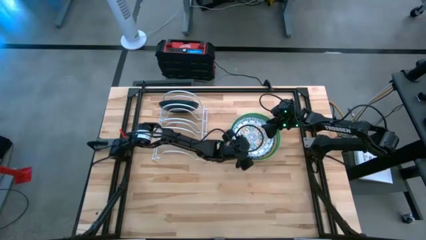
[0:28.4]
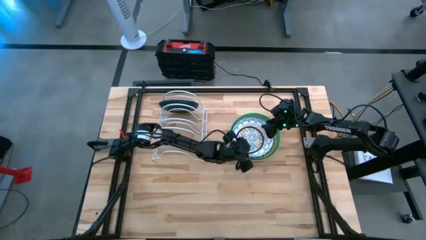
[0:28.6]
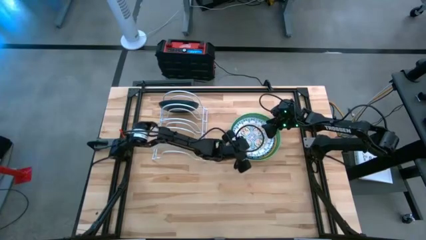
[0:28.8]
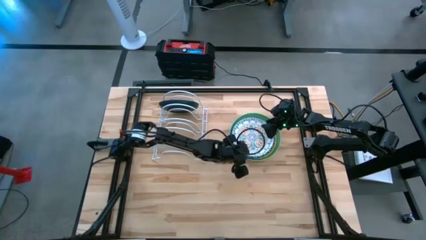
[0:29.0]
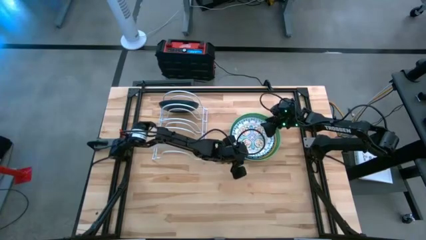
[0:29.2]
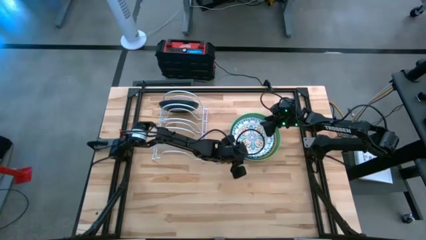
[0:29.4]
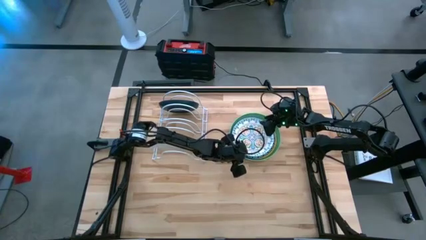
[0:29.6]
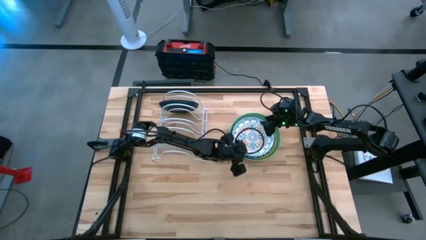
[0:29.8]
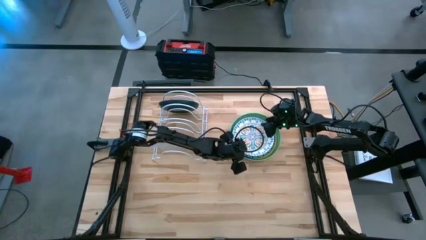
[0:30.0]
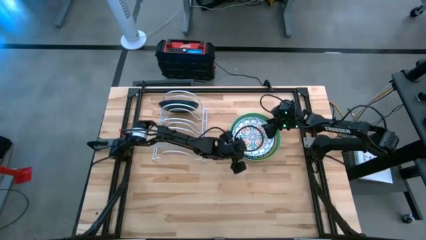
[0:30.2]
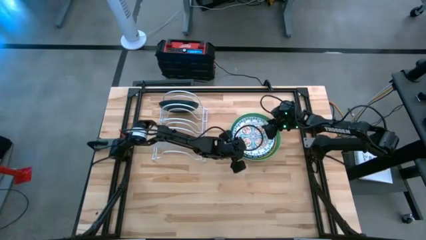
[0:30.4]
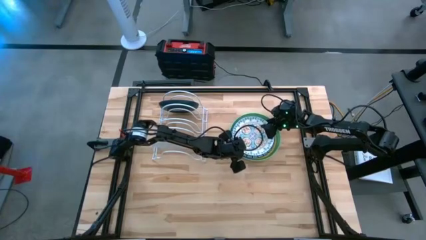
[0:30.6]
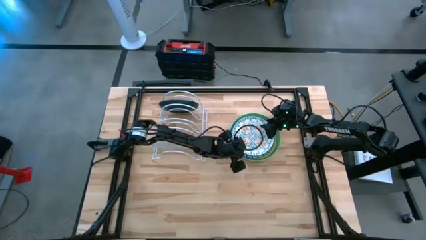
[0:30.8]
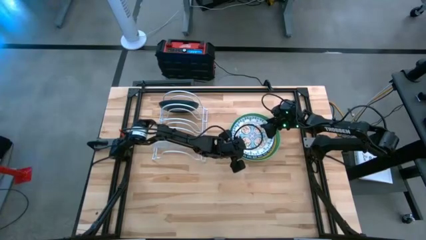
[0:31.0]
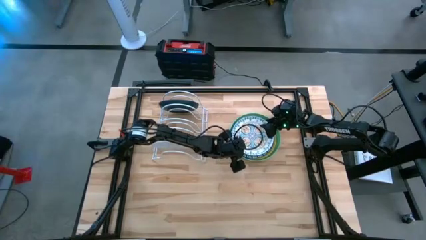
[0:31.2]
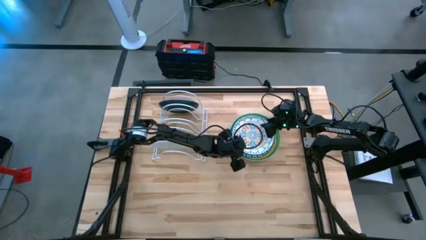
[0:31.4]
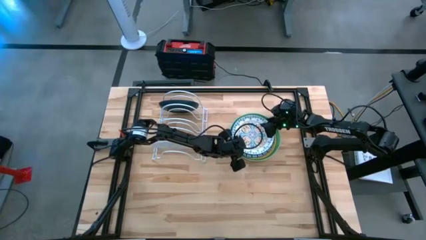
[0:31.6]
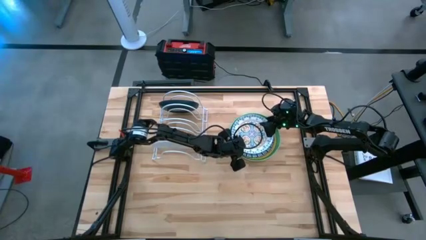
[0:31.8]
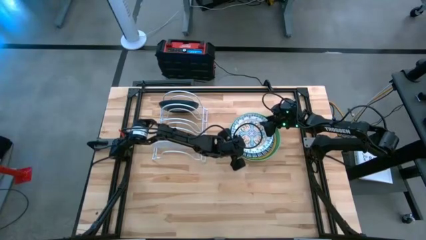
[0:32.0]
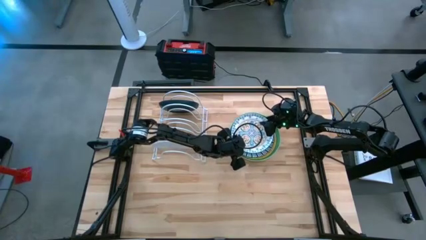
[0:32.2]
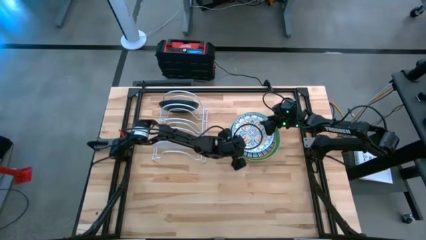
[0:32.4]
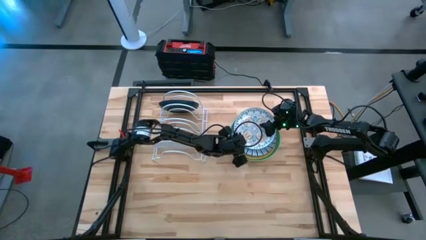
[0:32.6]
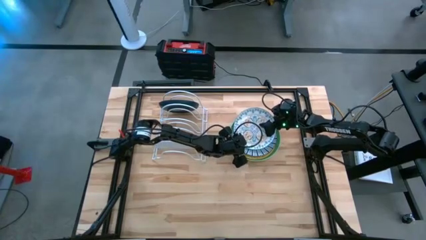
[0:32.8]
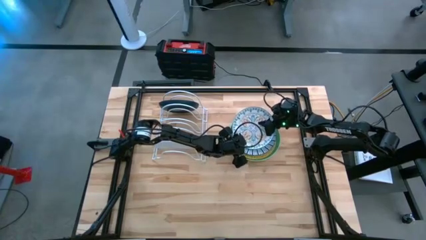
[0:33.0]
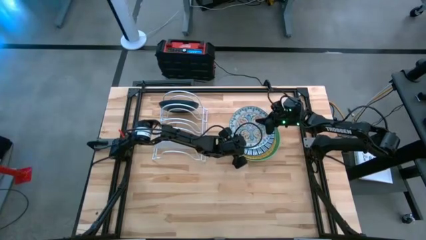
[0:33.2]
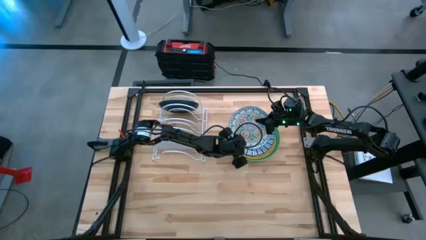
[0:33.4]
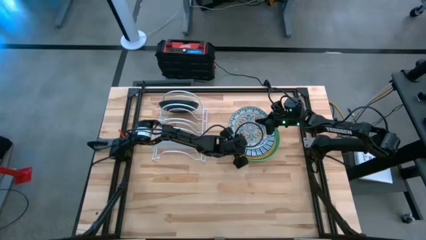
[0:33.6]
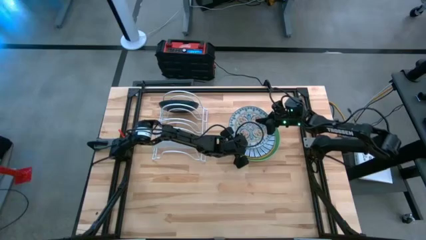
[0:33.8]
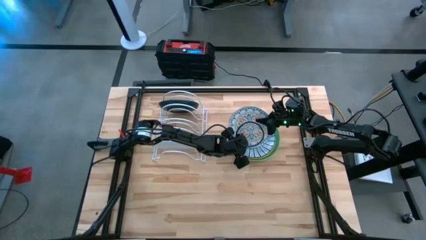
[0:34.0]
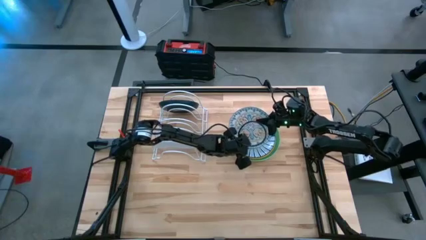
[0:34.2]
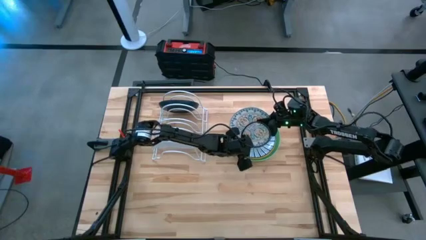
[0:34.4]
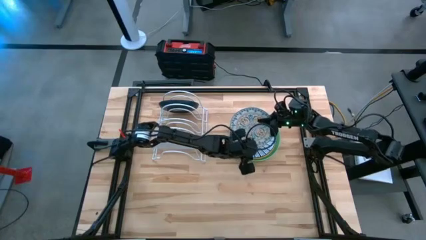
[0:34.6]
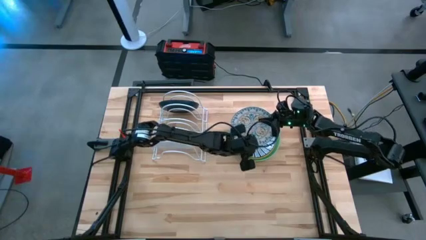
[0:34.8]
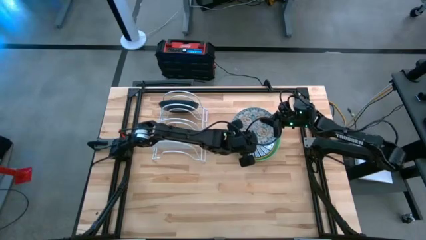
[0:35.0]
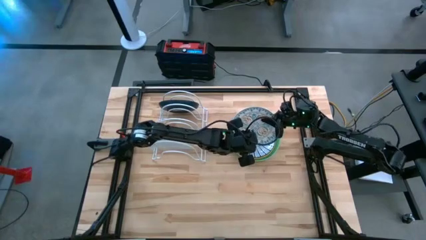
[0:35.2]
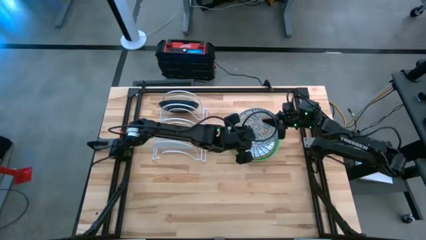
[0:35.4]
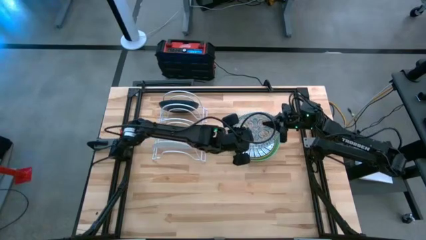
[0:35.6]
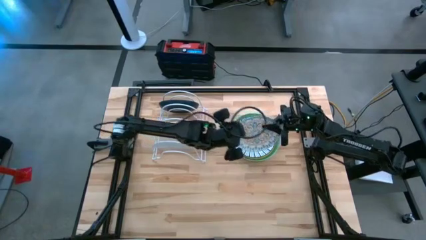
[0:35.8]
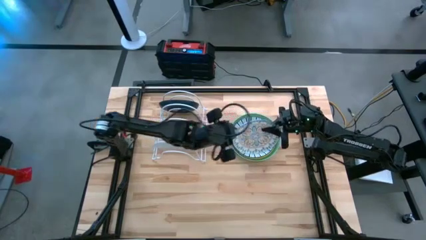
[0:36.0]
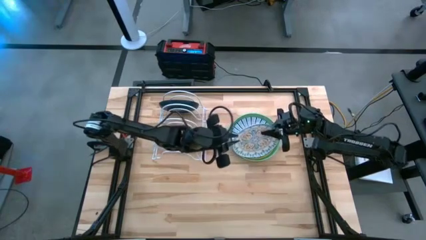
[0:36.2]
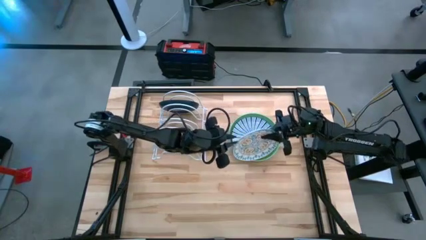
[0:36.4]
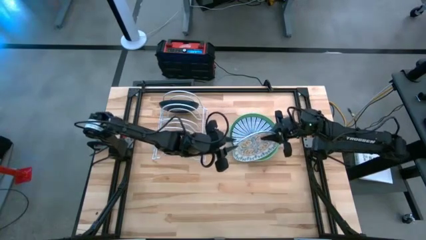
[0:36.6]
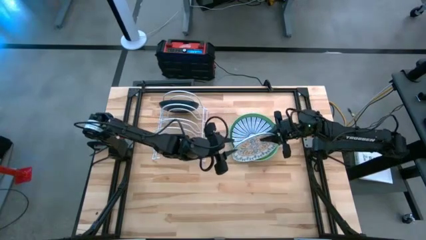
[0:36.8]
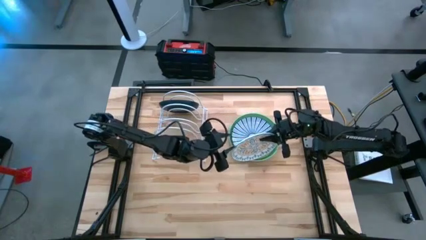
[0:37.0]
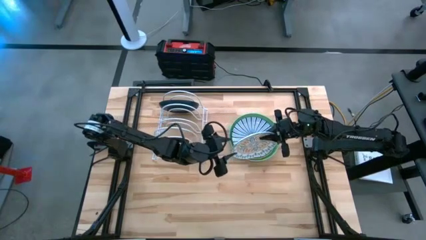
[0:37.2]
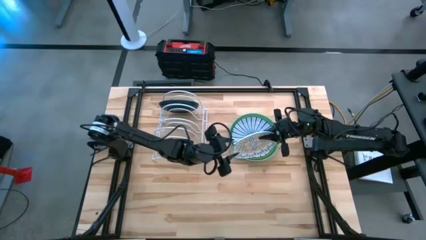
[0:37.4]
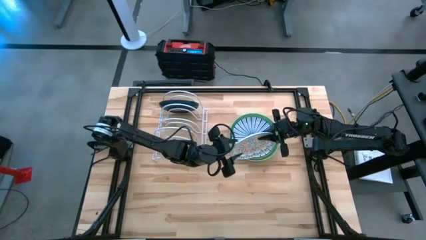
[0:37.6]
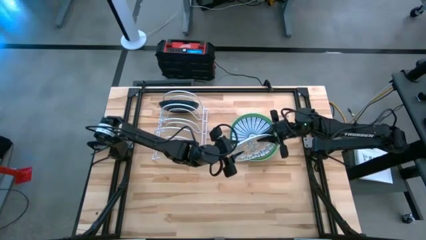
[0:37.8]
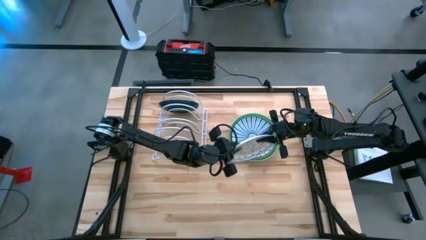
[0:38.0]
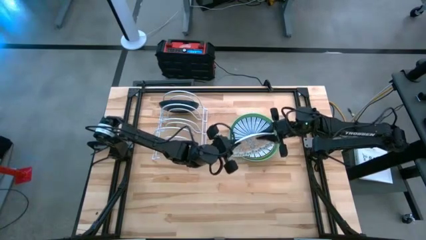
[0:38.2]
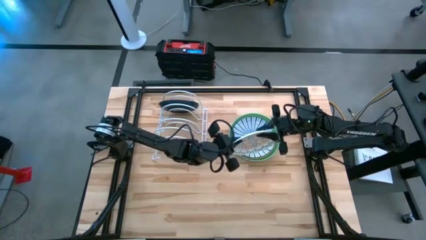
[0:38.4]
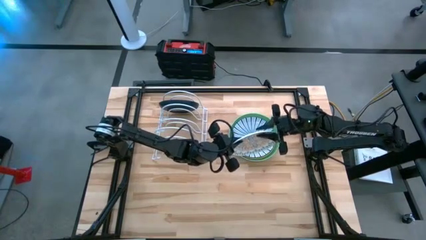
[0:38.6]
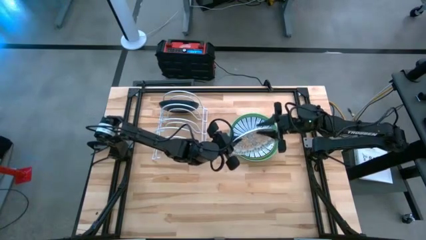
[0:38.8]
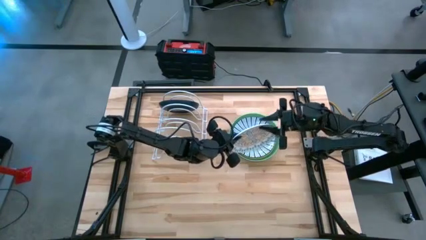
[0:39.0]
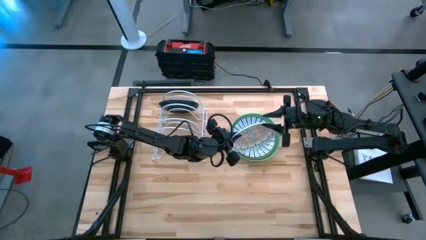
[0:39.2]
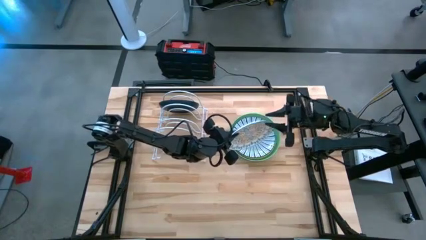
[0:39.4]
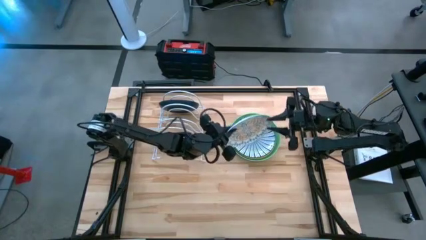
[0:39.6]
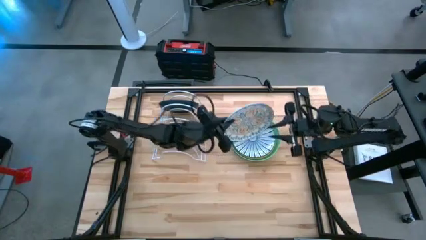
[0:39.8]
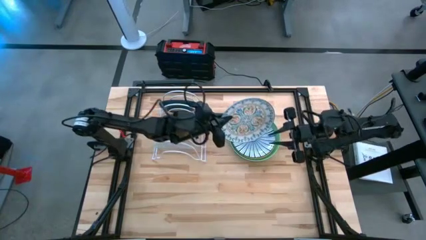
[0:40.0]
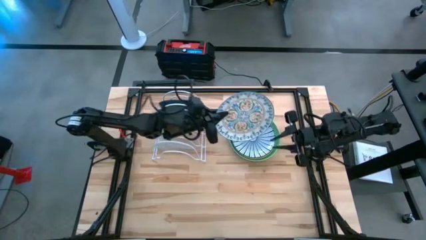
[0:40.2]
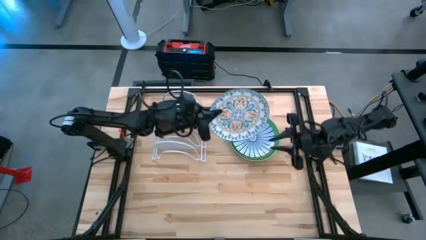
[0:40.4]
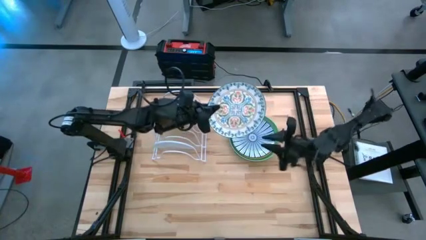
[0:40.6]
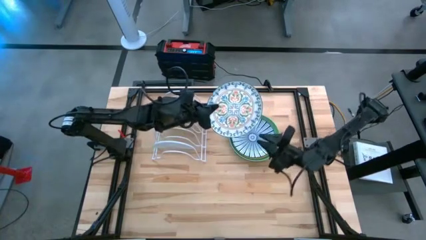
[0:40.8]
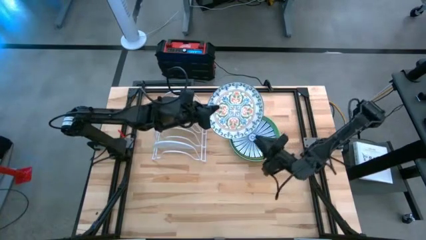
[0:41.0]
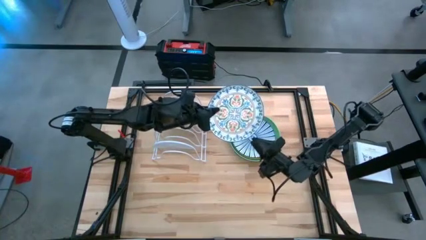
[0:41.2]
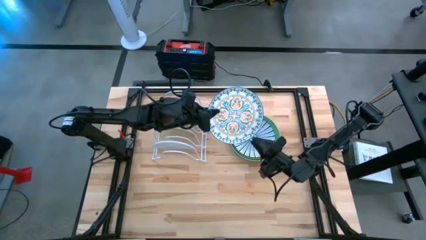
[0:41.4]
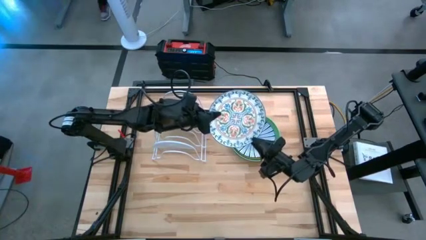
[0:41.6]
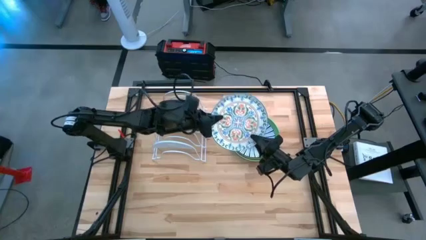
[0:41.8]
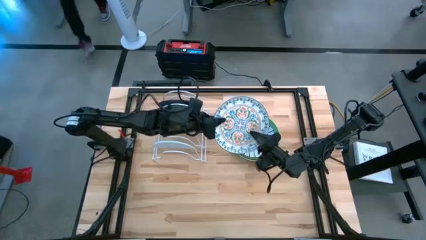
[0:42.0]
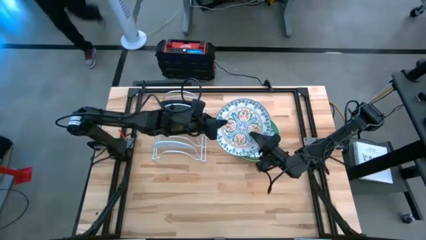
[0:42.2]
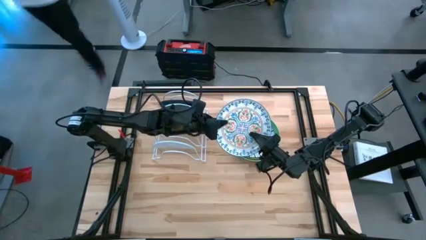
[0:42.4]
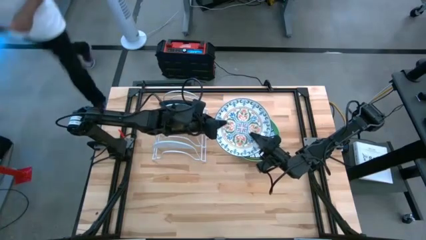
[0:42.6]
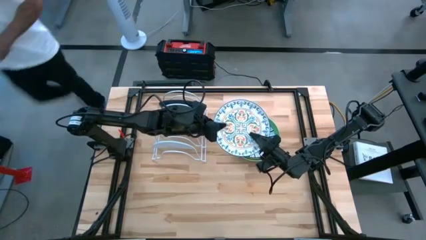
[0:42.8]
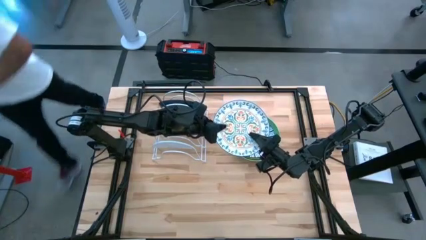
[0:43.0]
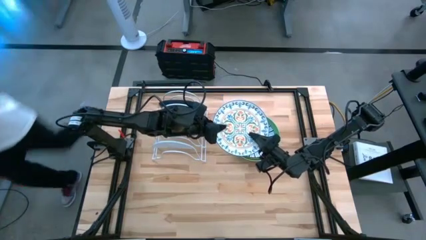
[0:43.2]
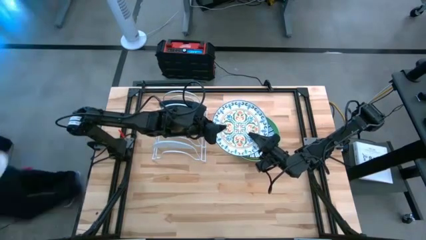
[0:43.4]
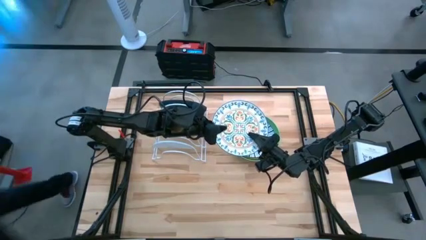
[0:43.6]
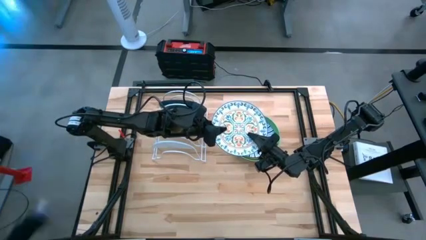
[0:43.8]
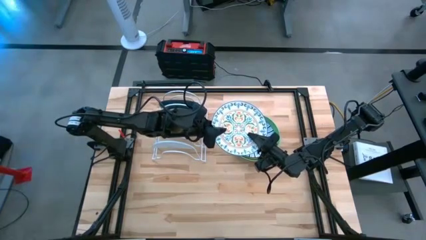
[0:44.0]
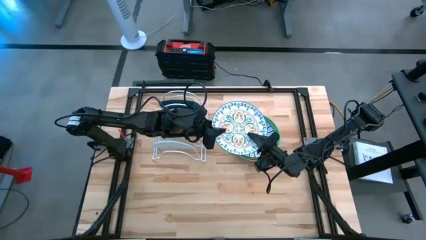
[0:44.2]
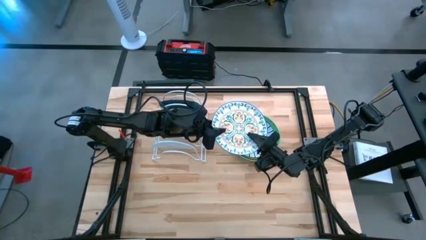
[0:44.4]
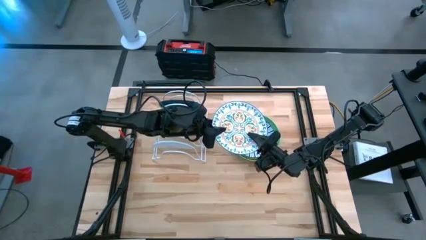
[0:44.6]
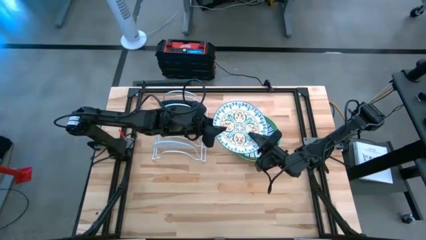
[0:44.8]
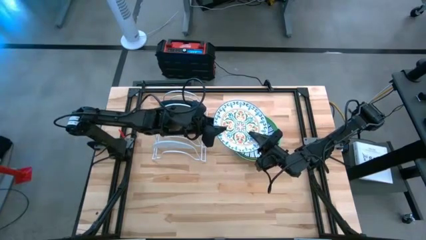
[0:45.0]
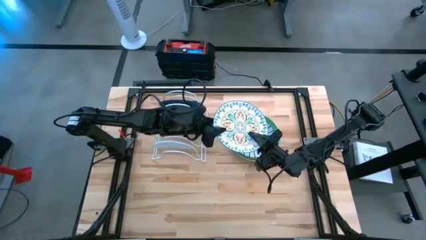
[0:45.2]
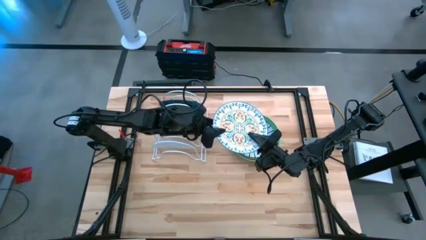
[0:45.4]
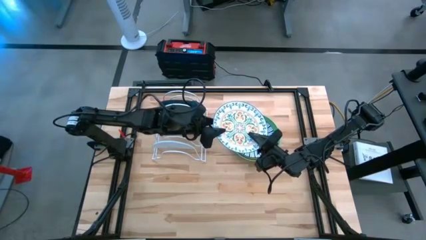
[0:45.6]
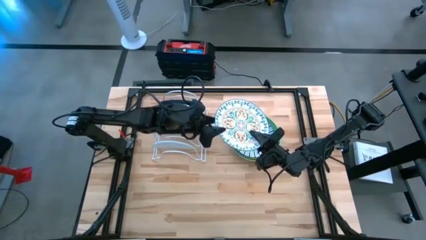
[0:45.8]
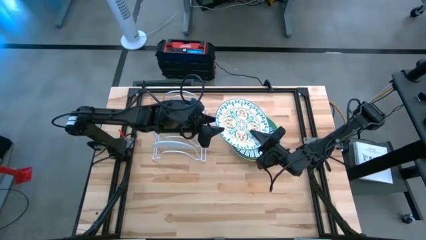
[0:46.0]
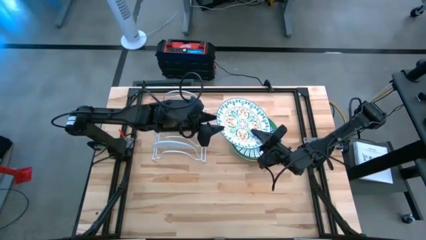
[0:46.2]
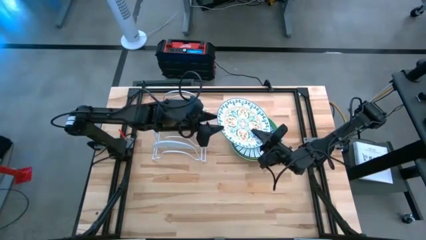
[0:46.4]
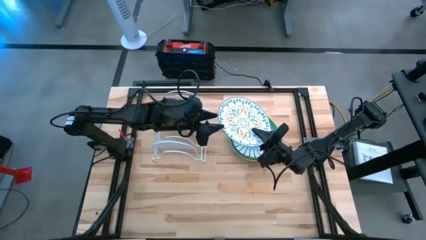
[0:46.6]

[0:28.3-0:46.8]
Task: Sort dishes
Put the white pattern plate in the dish rack
